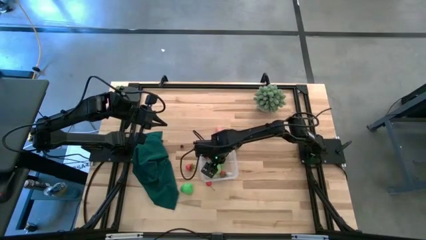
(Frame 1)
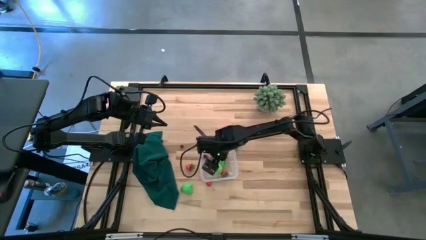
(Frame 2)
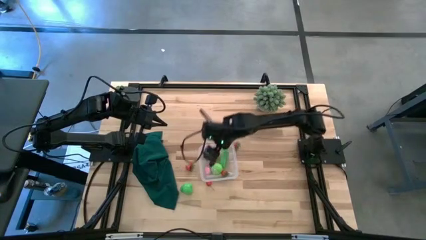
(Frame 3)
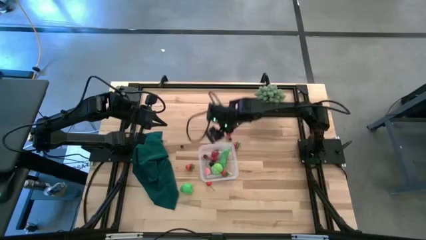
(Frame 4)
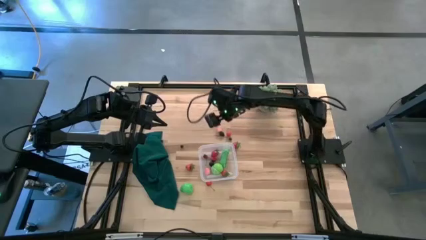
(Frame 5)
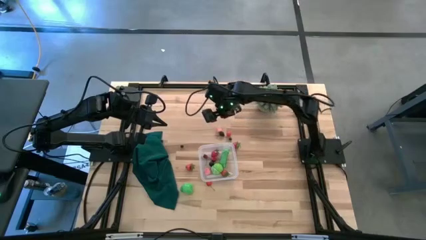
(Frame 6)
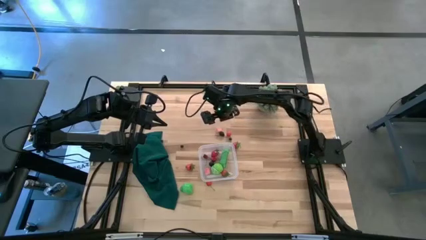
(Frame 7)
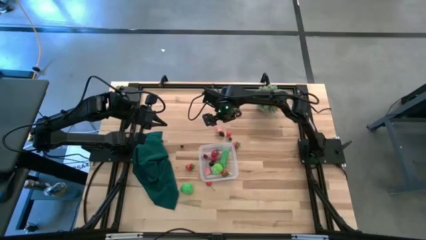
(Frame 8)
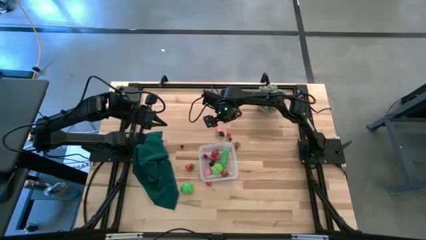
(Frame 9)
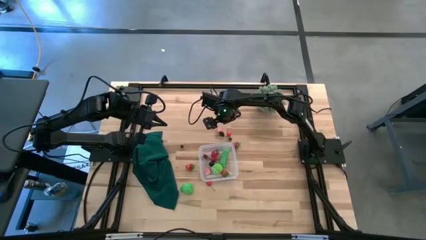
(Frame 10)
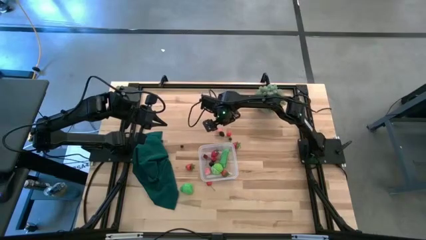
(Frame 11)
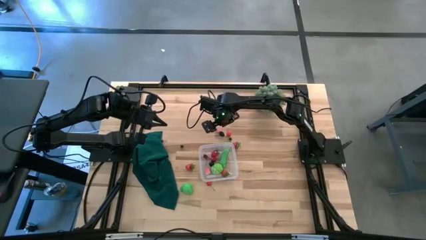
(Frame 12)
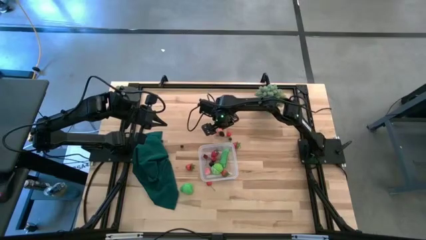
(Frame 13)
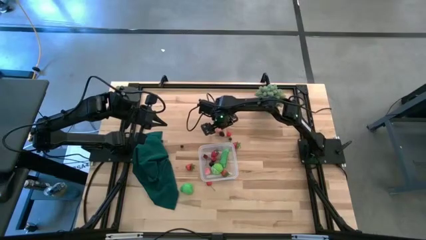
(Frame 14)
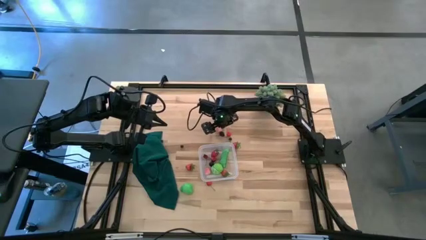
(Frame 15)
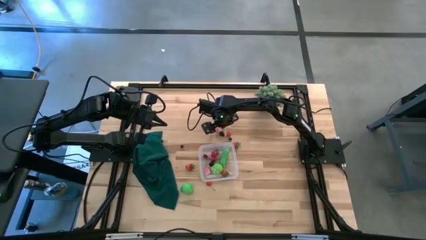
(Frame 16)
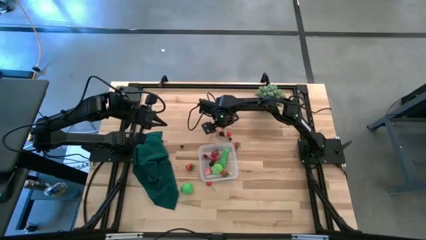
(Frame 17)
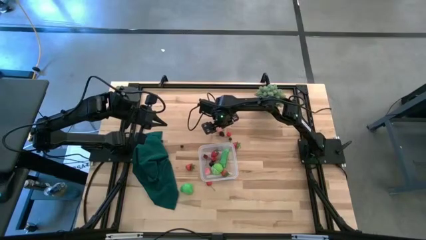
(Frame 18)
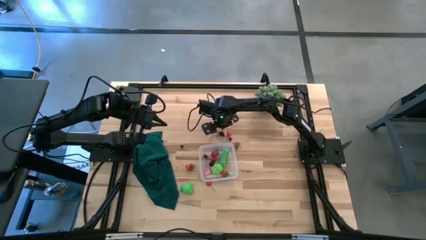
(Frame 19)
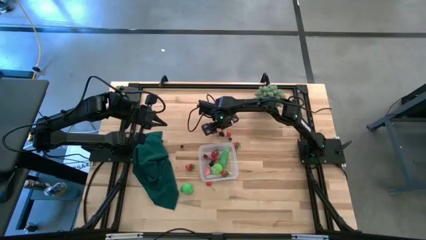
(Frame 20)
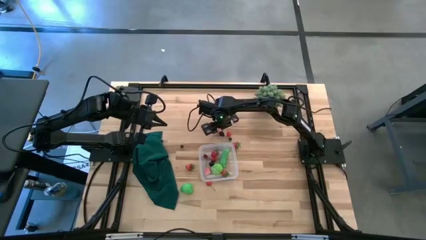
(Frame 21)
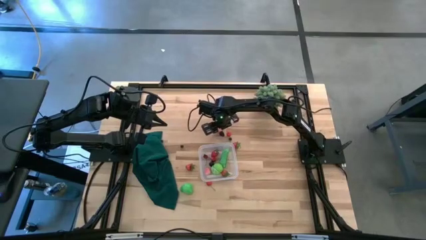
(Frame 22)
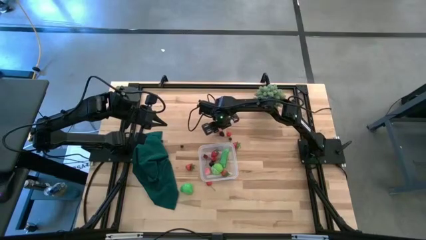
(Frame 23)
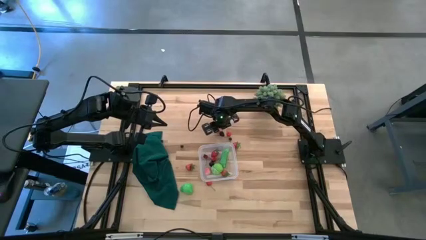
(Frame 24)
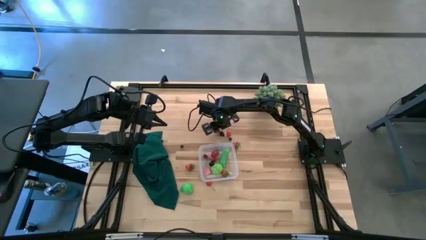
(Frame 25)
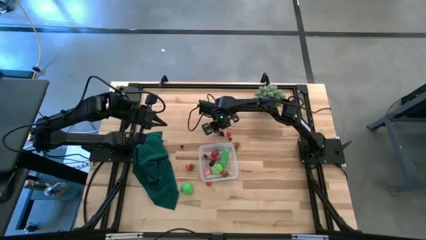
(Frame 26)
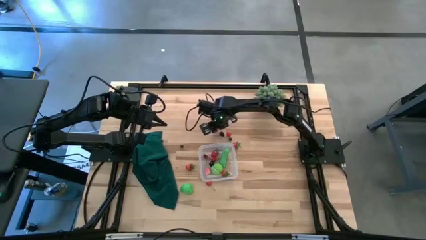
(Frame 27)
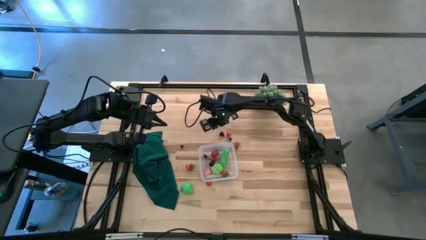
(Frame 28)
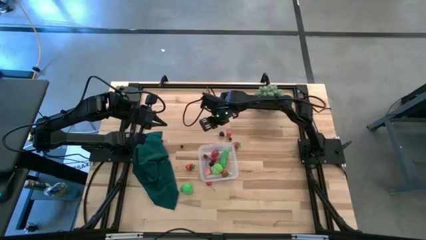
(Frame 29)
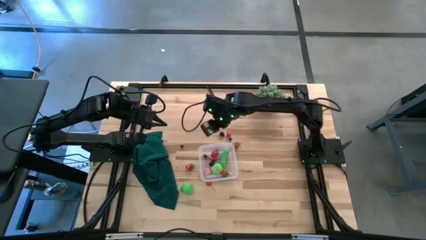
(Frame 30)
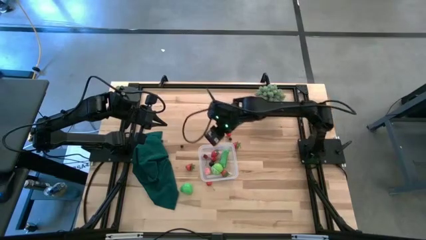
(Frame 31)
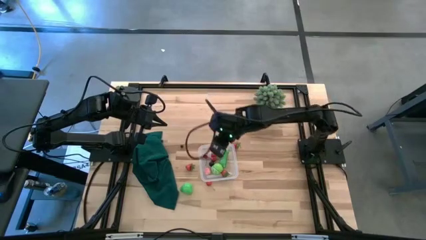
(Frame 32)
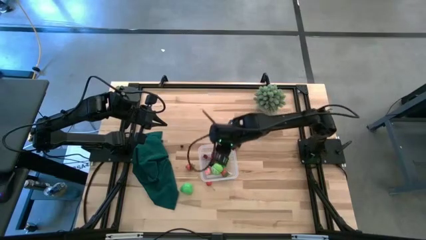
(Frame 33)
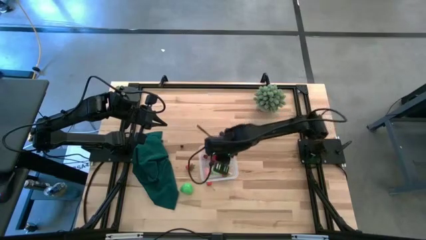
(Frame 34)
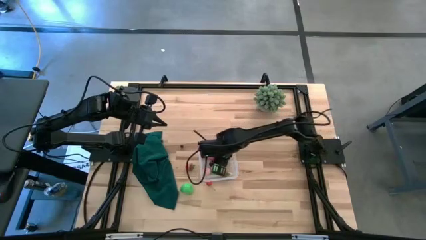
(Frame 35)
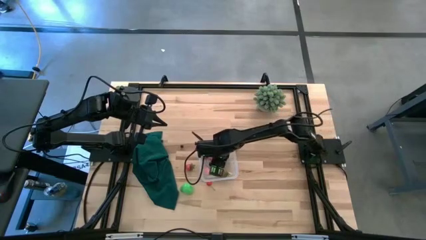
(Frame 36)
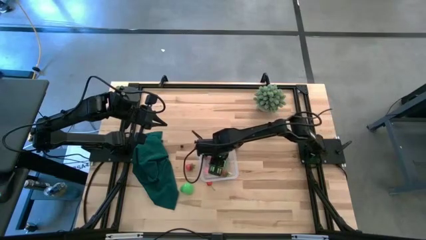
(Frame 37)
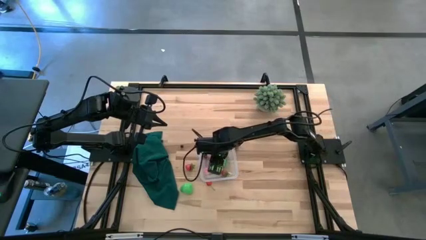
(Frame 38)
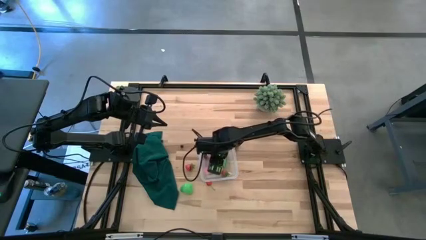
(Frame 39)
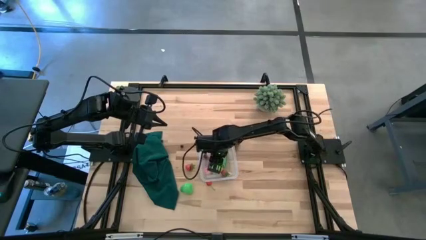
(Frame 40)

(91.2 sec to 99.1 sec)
Task: Pick and placing Produce into tupperware
Put the pink peach into the transparent bin

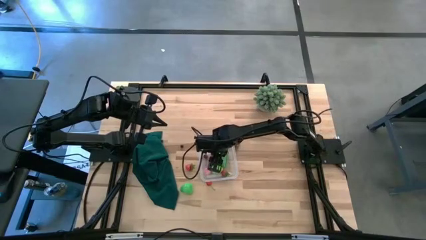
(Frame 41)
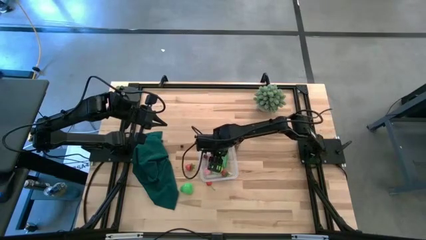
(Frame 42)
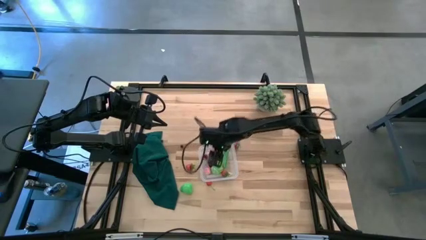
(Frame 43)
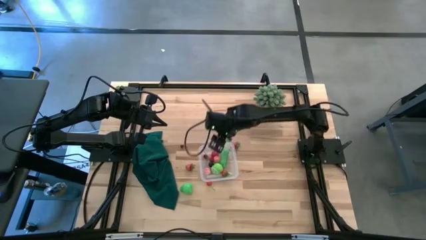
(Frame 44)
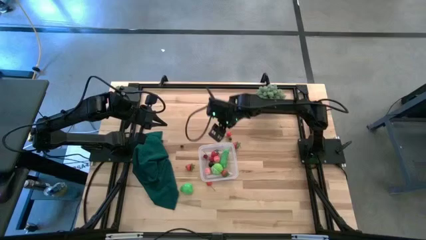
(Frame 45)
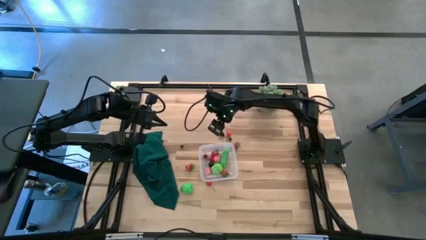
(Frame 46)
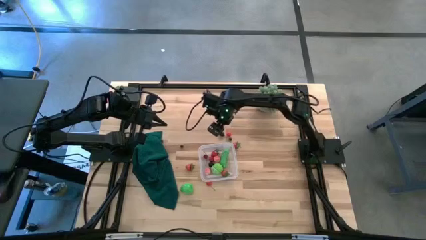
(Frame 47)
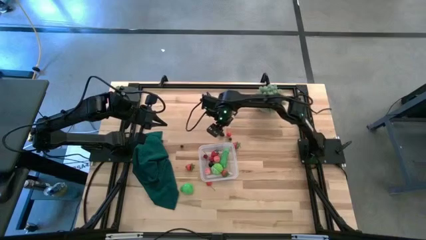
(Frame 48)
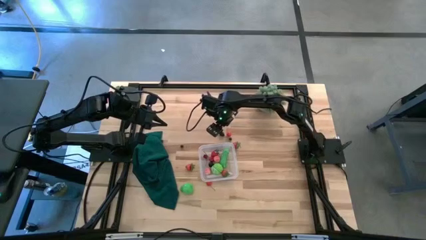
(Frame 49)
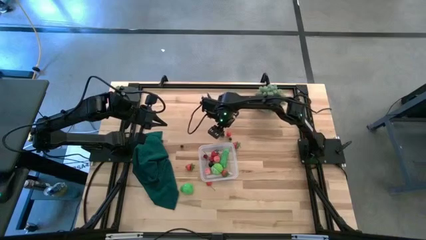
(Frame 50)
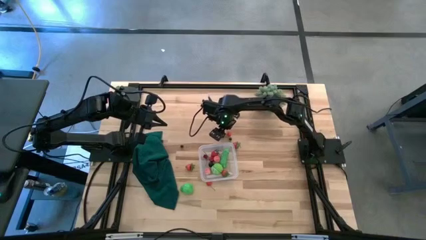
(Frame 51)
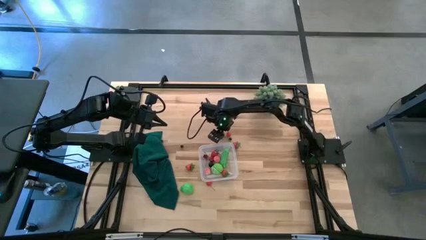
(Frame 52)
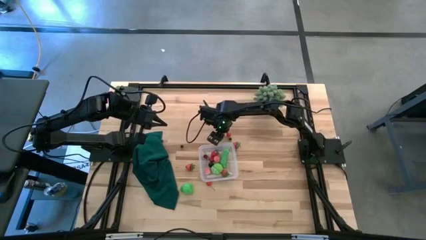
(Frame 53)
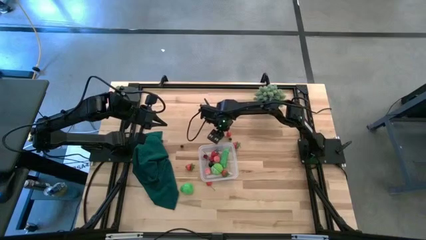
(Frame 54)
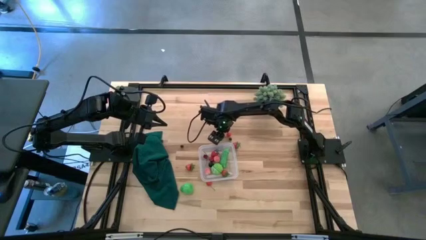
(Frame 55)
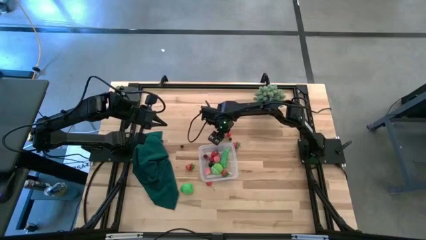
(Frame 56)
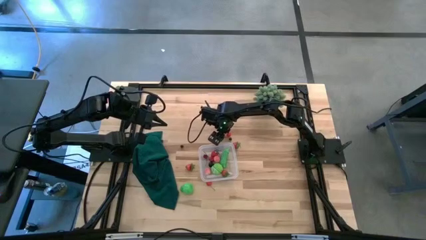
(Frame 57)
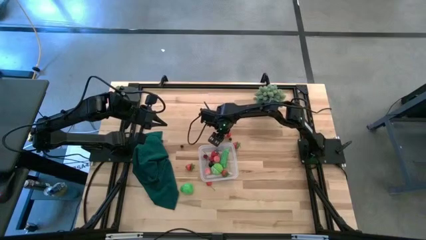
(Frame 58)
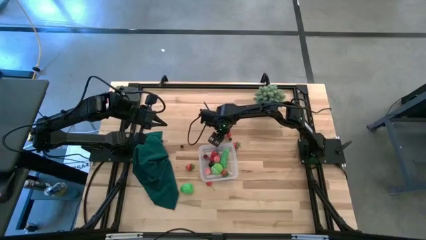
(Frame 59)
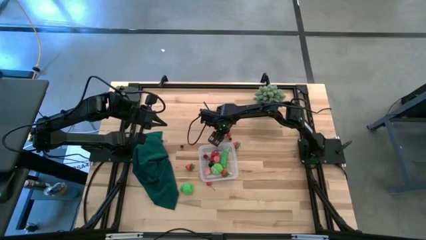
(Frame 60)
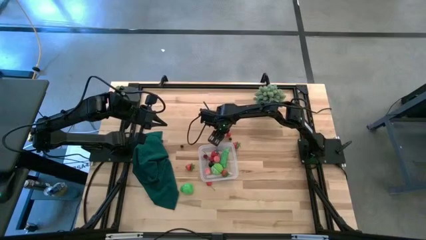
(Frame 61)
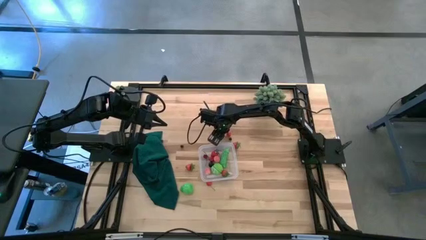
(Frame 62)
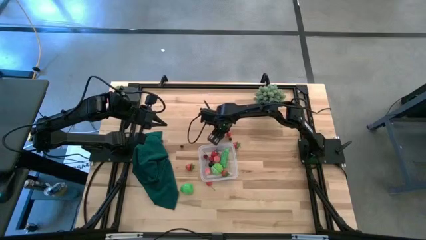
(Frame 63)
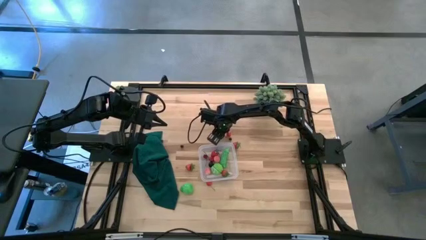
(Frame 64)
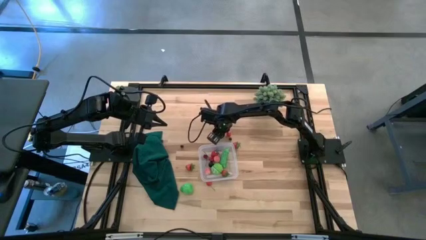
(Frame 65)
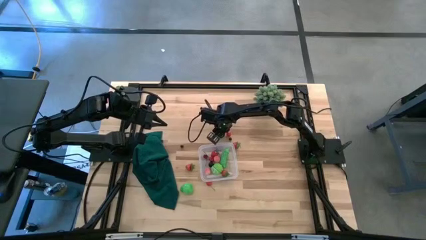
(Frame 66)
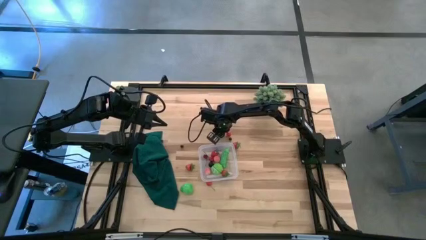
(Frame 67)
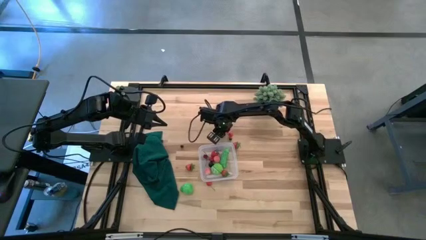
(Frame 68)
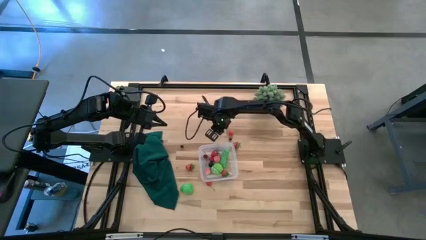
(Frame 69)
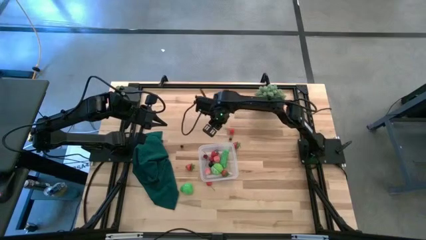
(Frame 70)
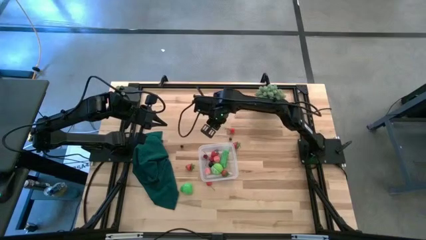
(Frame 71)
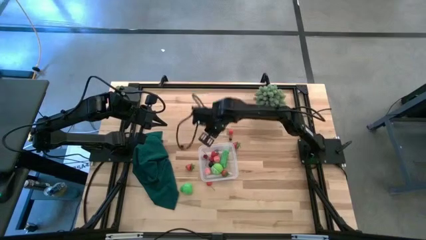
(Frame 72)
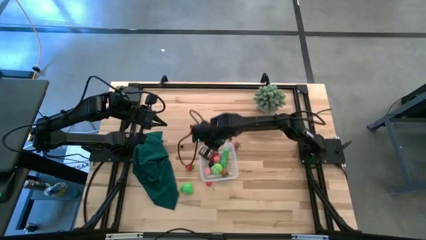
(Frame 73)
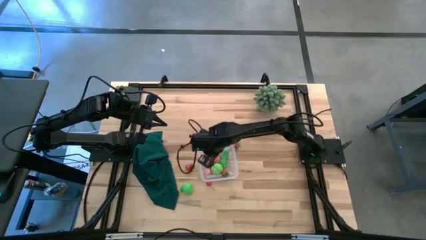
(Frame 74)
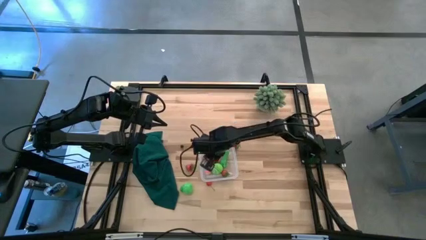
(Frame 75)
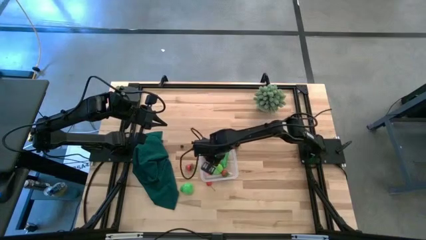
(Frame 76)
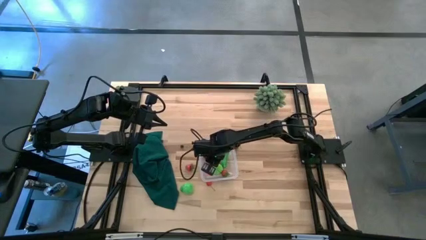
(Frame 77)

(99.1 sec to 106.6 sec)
Put the blackberry into the transparent bin
